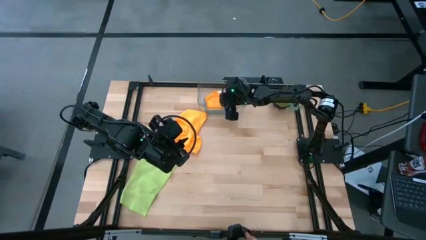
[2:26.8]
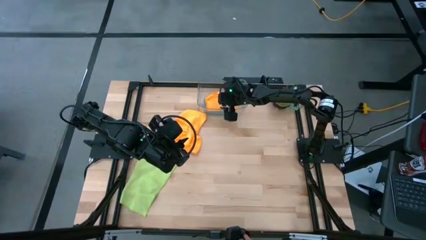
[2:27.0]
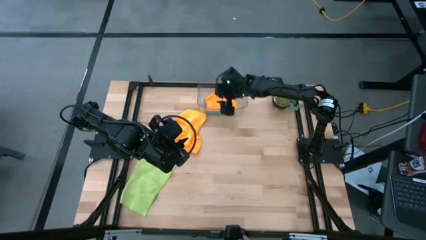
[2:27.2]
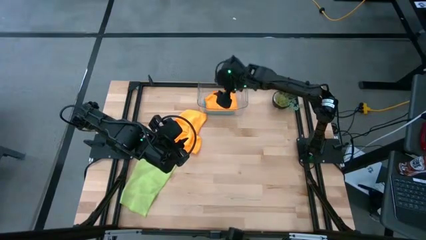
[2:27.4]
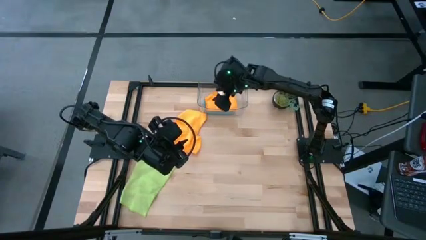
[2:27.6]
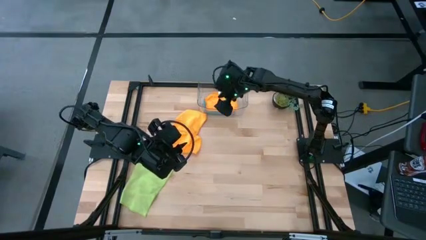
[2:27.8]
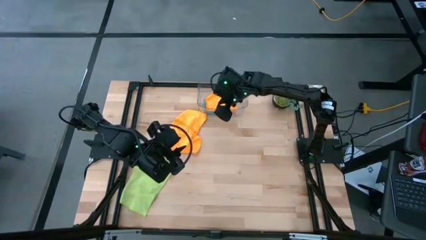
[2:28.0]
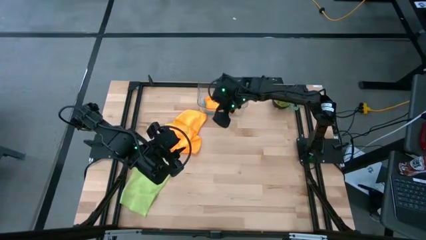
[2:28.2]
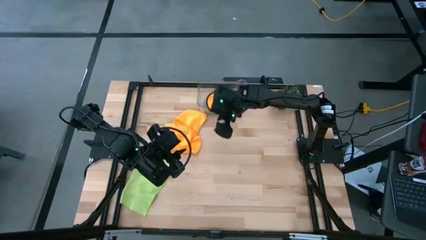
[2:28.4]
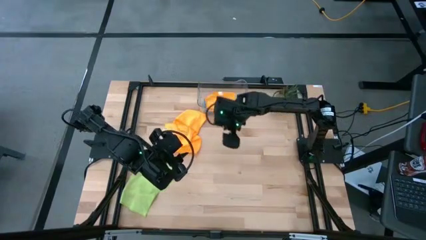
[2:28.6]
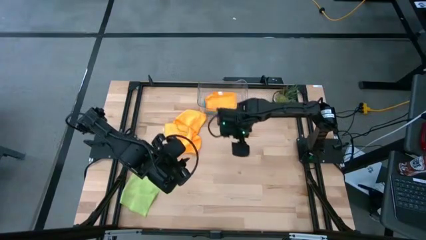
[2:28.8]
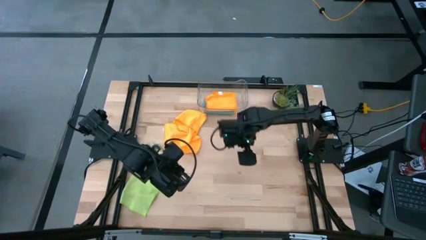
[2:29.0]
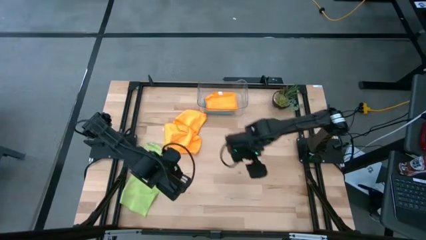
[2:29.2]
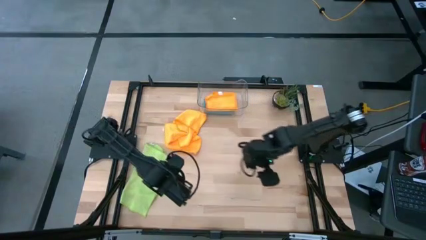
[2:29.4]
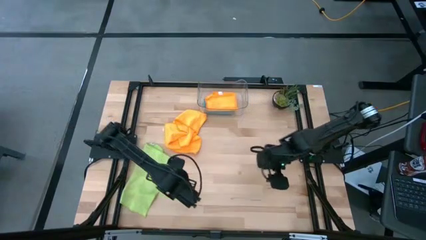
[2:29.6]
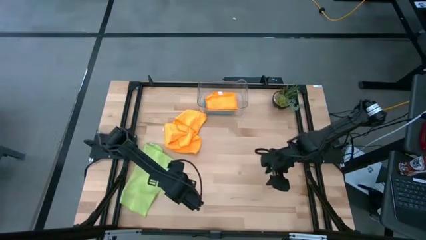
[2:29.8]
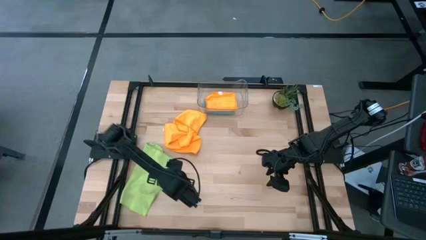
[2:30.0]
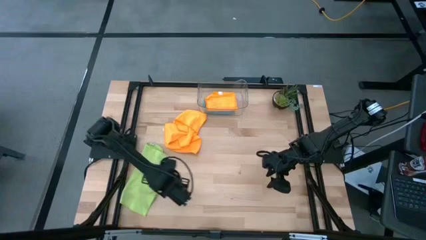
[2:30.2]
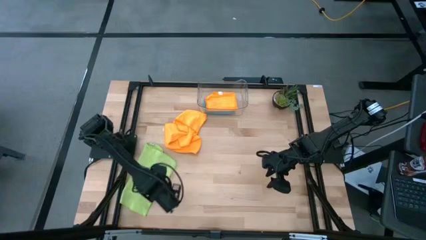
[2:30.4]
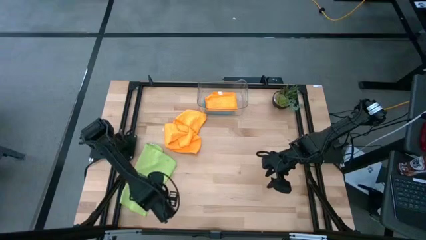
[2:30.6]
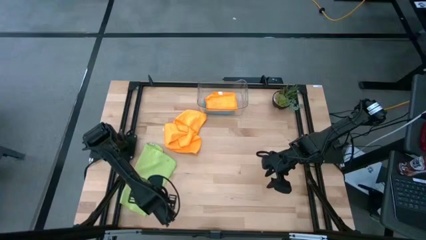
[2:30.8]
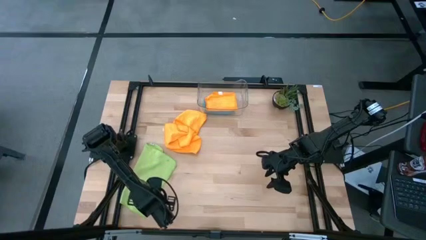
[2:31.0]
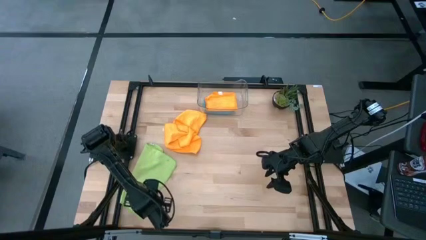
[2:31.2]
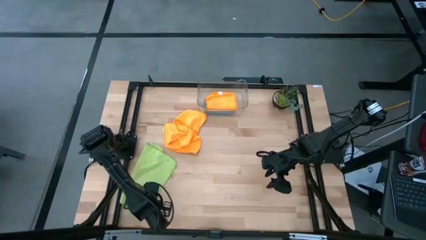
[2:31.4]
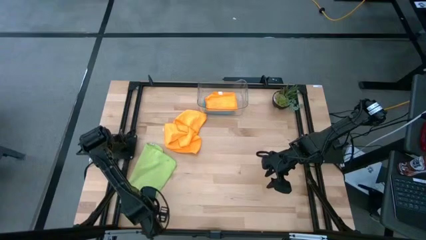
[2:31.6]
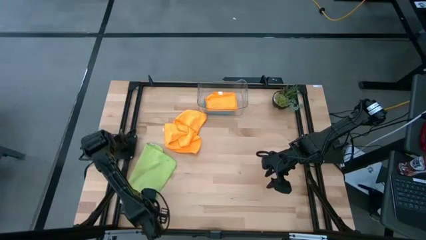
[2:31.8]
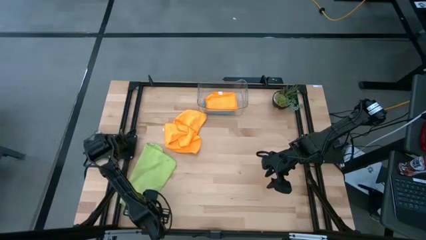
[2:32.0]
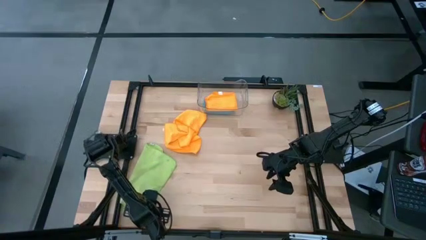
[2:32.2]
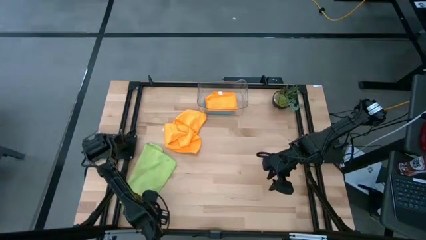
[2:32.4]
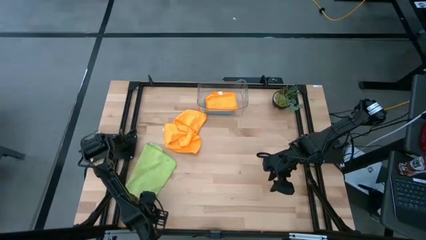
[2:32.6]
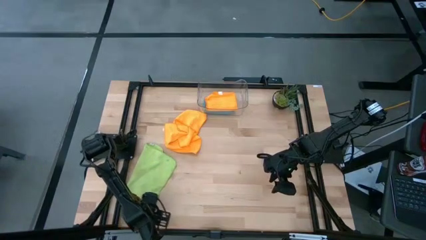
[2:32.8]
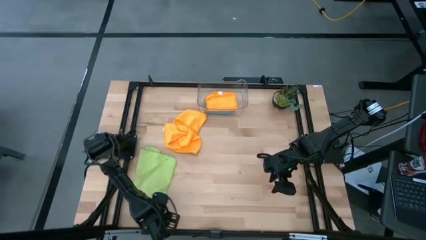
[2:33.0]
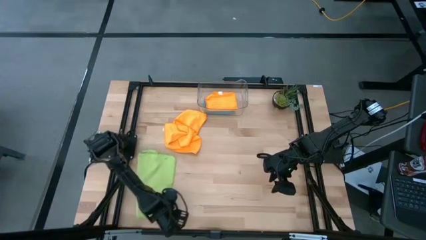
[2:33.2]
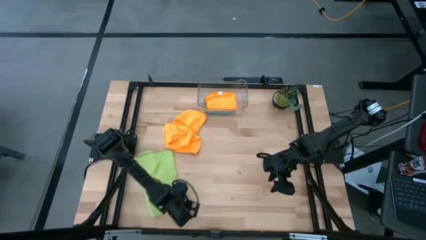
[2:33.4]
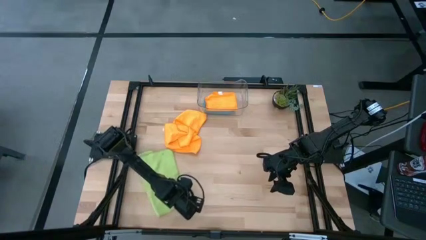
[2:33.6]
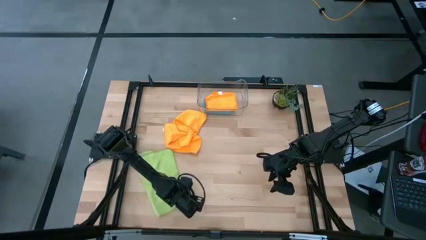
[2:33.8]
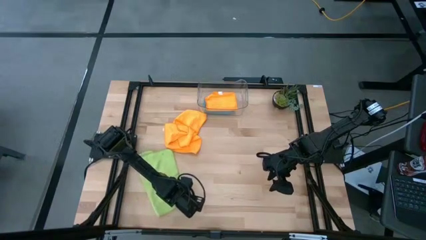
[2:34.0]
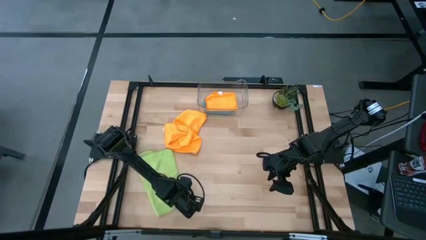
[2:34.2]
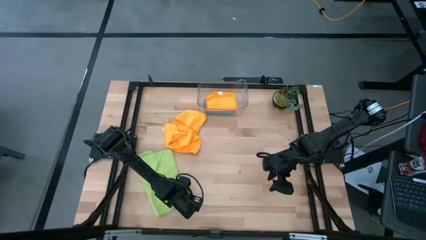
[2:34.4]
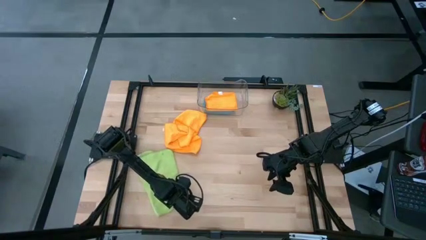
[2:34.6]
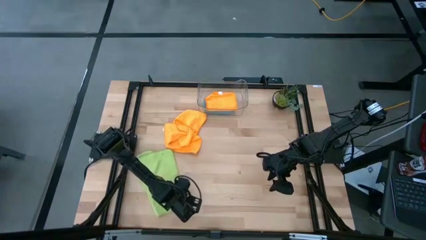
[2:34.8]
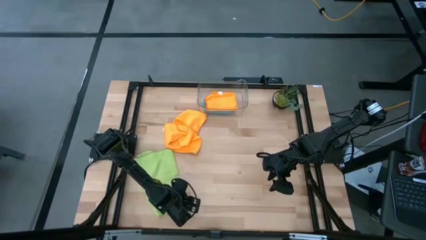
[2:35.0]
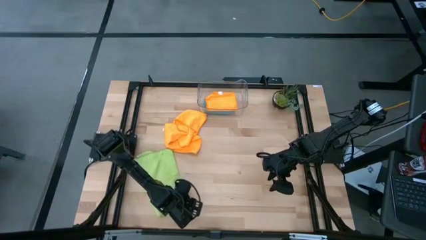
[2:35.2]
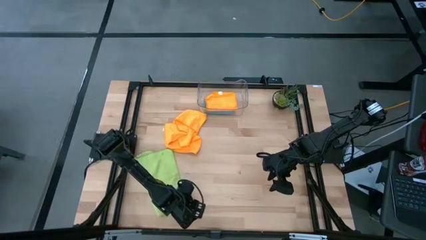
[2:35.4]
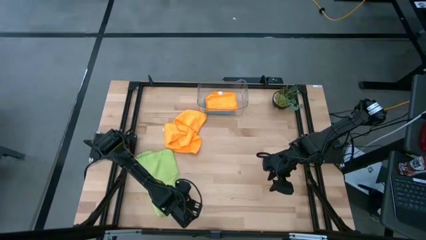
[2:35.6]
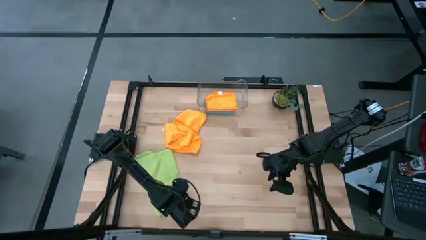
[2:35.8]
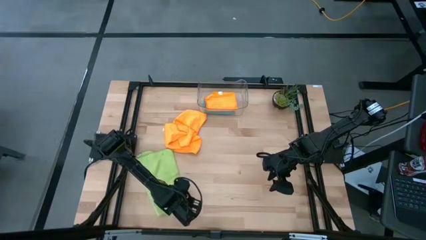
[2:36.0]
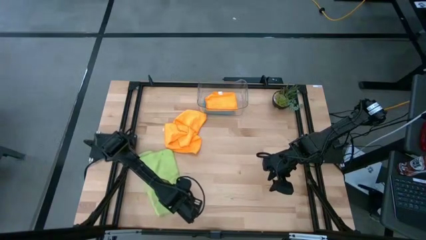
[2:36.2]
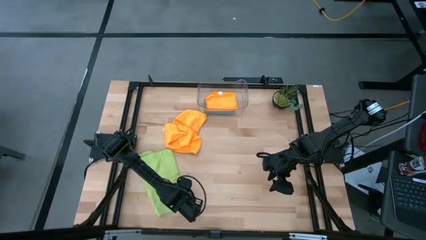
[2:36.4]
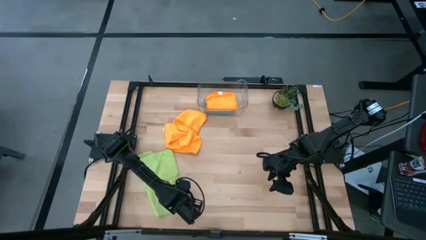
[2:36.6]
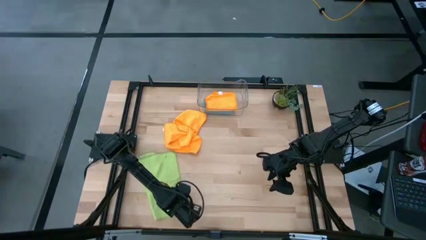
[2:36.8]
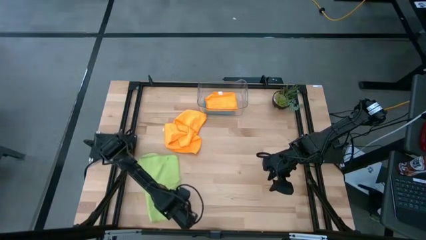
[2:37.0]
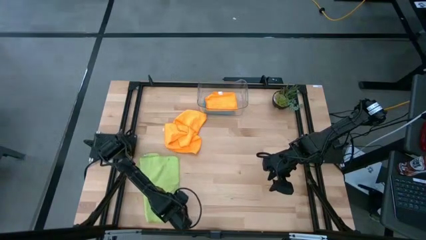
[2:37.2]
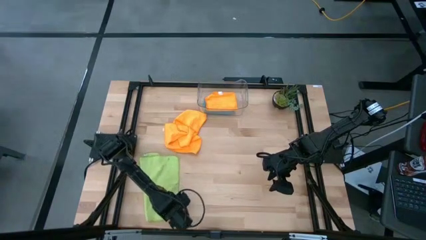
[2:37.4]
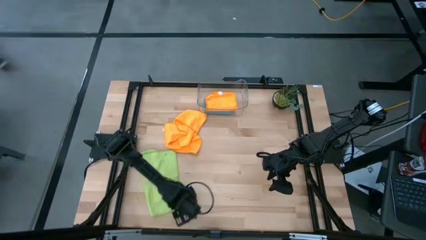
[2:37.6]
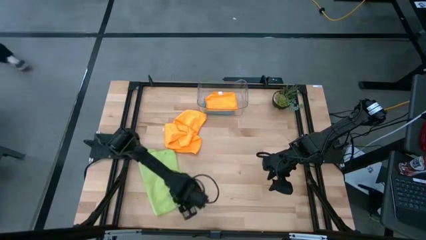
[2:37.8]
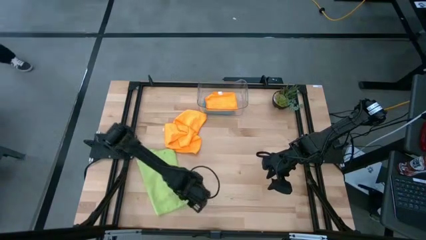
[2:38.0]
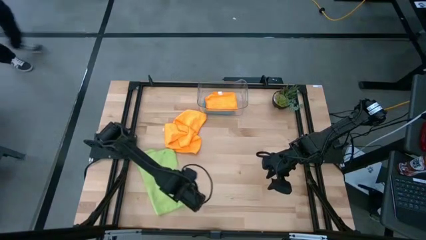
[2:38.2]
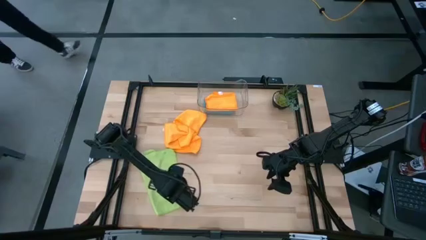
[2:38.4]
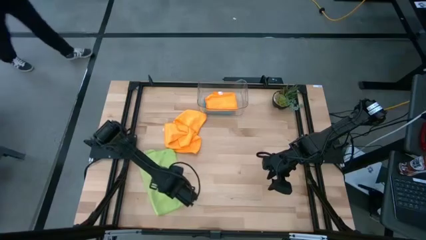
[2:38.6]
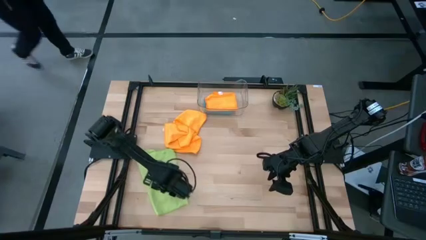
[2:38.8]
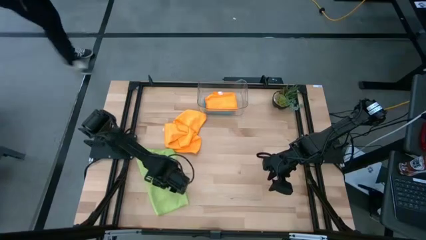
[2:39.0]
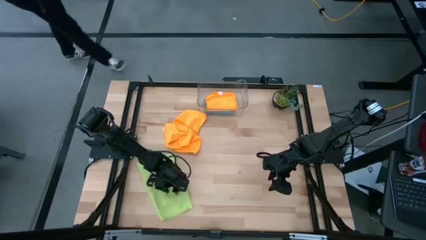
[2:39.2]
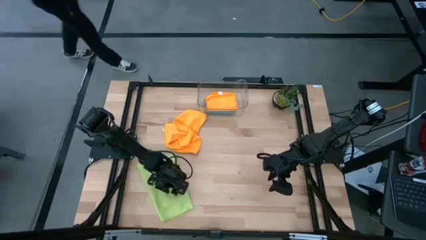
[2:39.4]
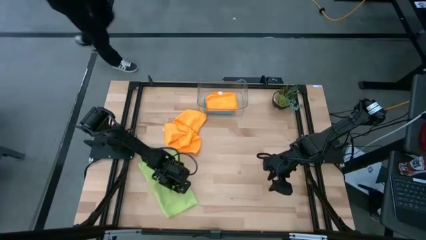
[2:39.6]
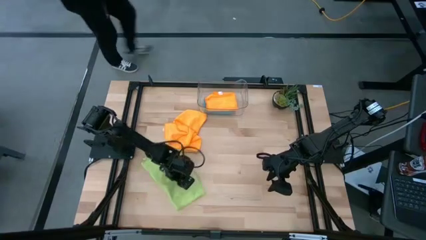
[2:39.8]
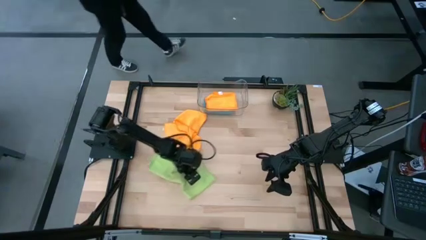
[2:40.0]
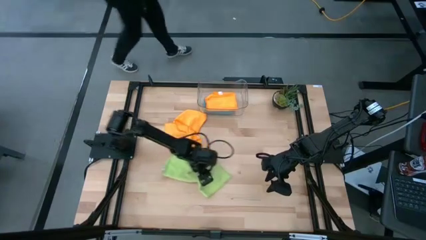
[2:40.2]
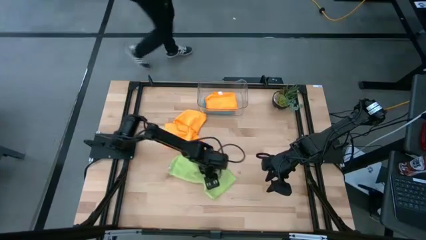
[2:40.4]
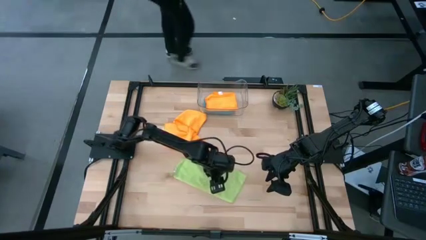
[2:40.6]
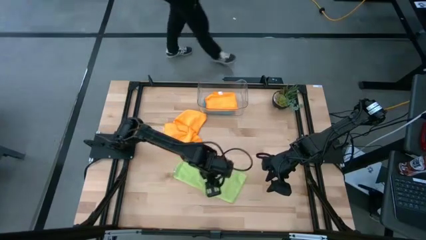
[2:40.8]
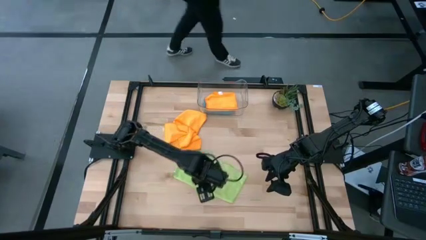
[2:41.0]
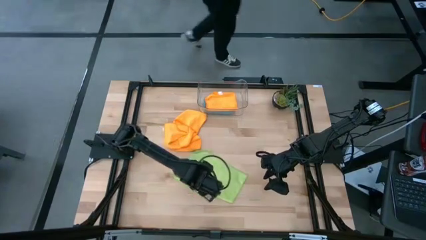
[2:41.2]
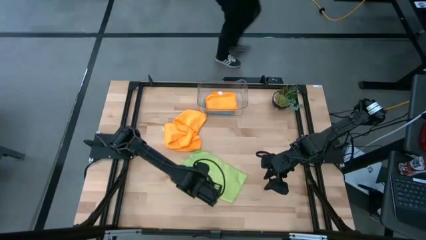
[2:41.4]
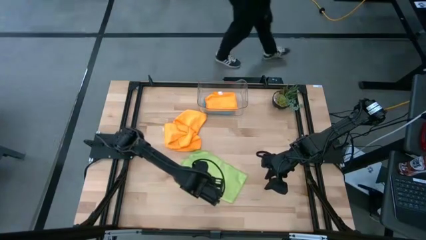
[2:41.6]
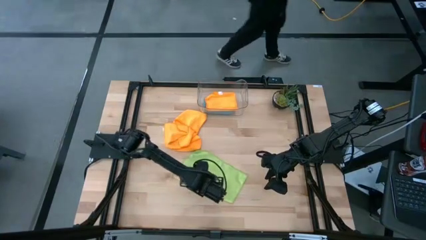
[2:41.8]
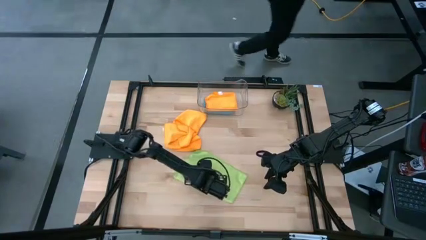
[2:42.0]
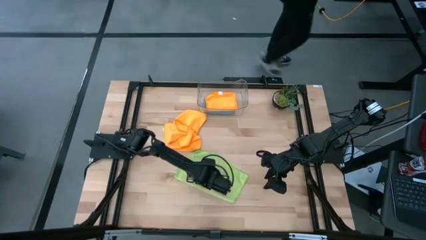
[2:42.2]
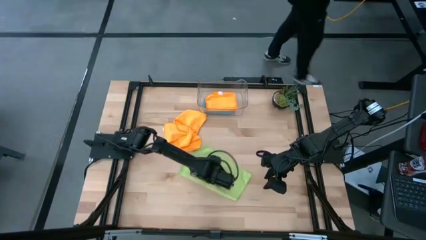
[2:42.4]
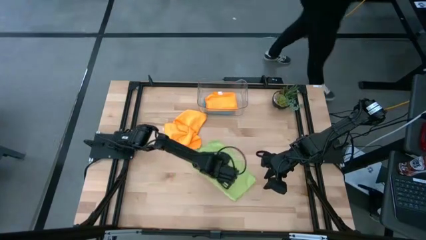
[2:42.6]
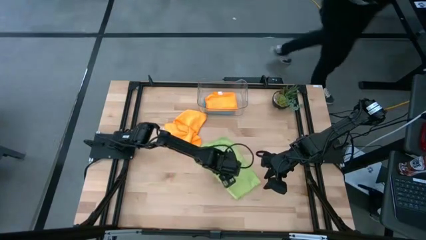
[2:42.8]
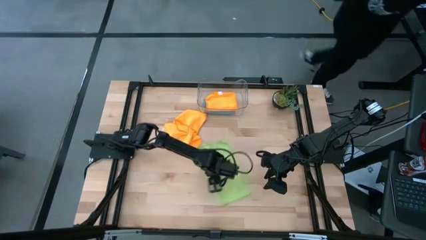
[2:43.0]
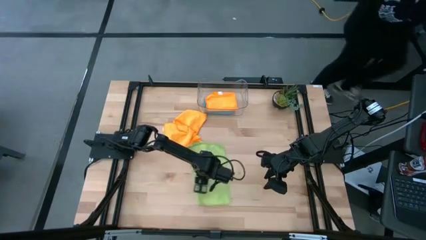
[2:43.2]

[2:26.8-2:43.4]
Task: Fold microfiber towels
Fold the green microfiber cloth
